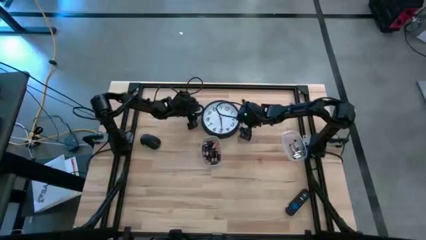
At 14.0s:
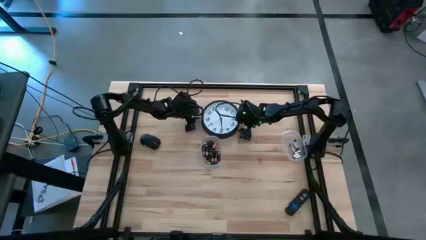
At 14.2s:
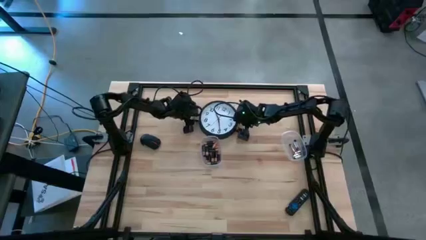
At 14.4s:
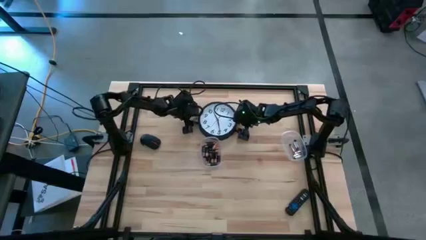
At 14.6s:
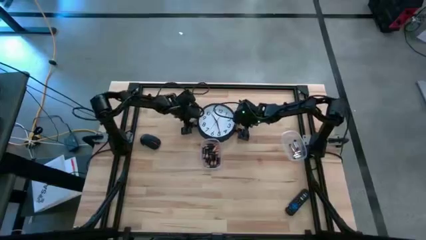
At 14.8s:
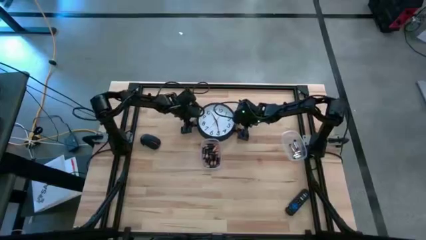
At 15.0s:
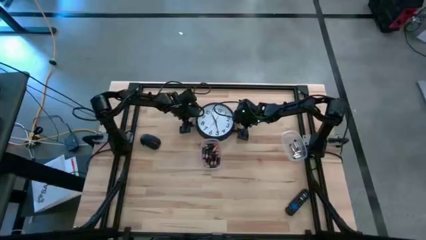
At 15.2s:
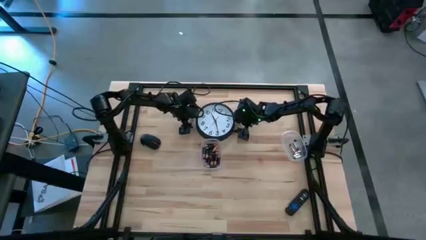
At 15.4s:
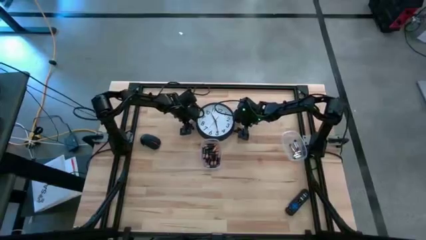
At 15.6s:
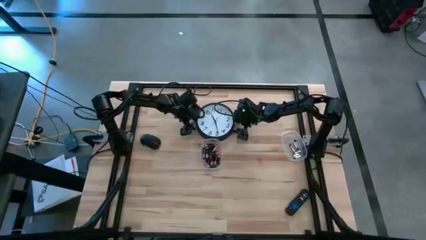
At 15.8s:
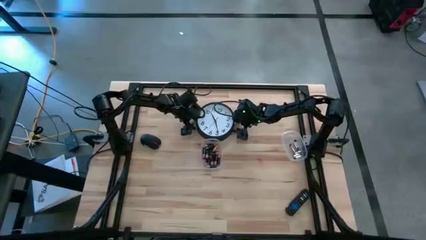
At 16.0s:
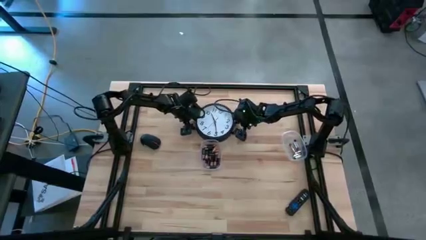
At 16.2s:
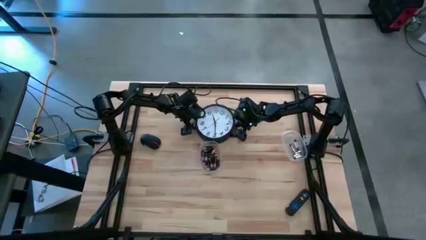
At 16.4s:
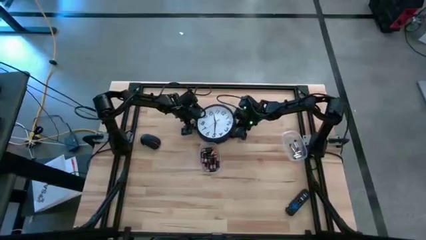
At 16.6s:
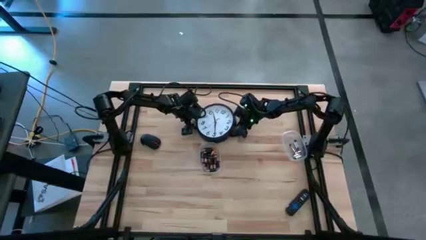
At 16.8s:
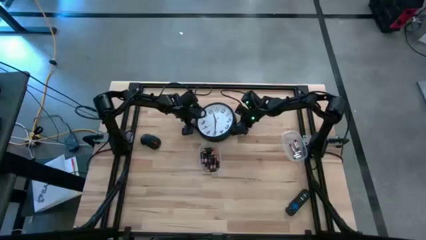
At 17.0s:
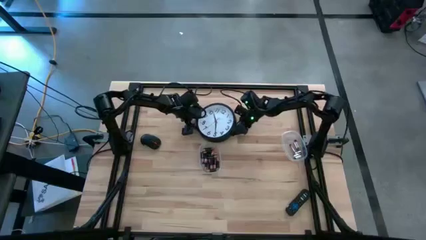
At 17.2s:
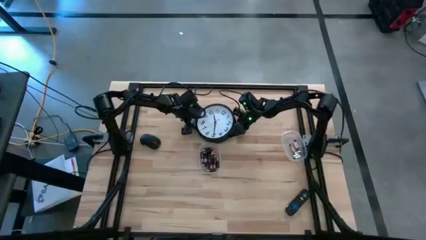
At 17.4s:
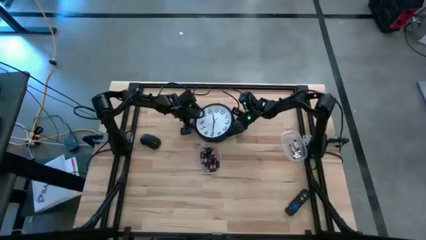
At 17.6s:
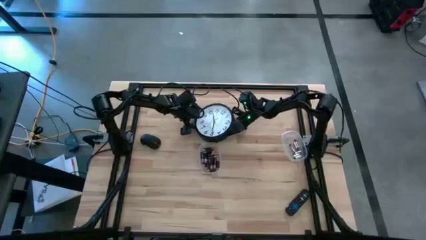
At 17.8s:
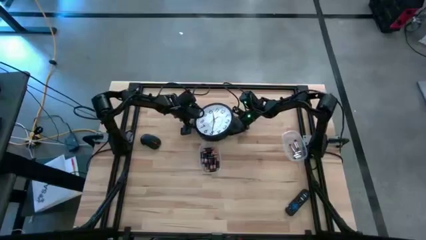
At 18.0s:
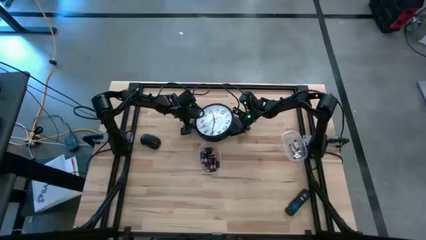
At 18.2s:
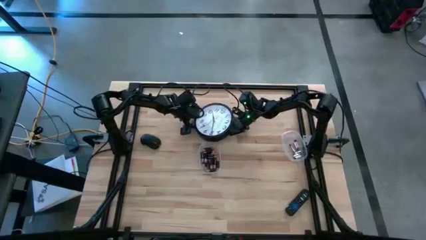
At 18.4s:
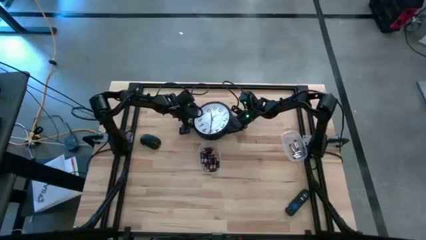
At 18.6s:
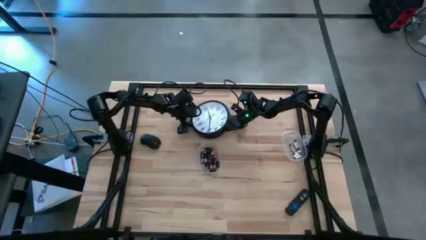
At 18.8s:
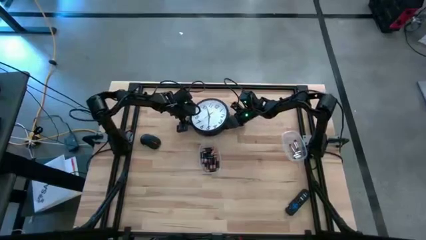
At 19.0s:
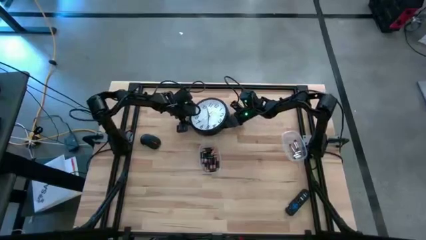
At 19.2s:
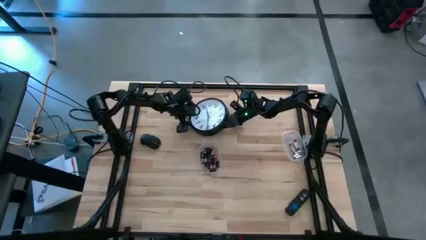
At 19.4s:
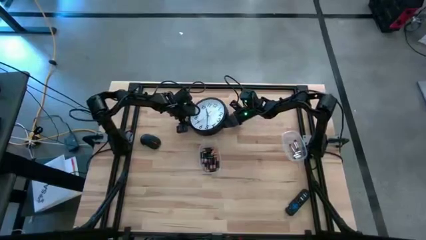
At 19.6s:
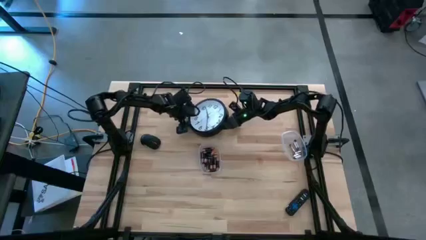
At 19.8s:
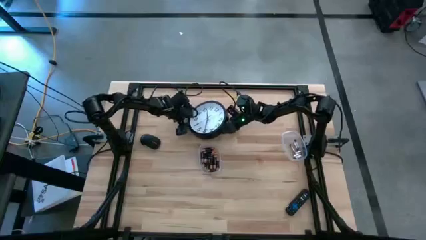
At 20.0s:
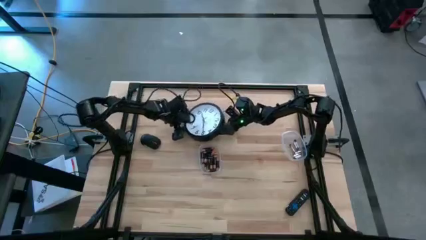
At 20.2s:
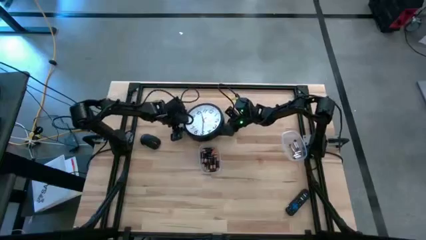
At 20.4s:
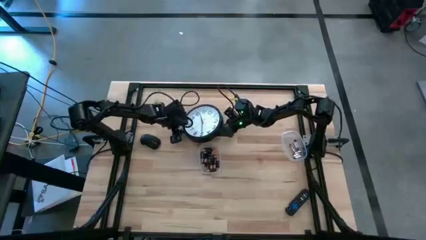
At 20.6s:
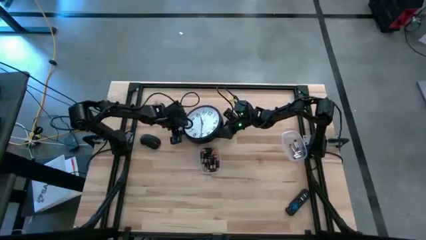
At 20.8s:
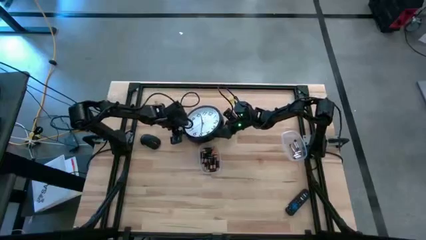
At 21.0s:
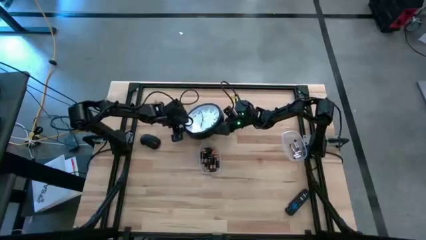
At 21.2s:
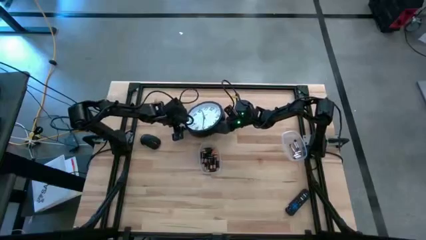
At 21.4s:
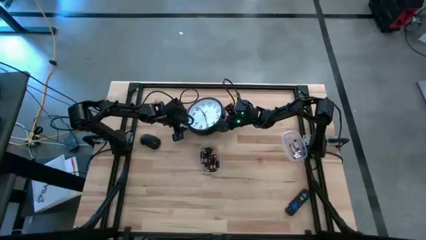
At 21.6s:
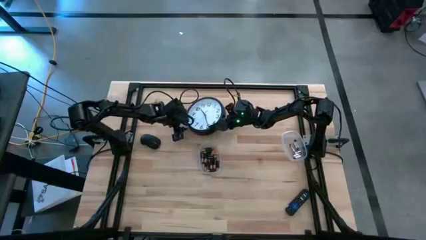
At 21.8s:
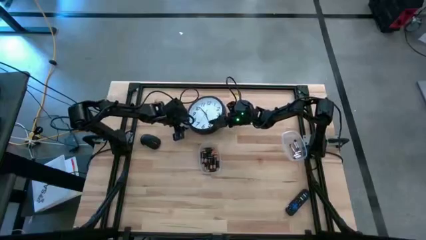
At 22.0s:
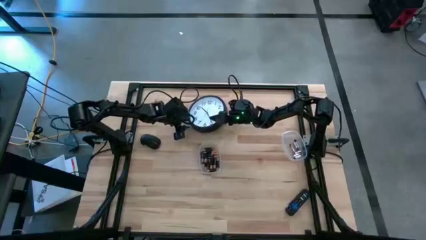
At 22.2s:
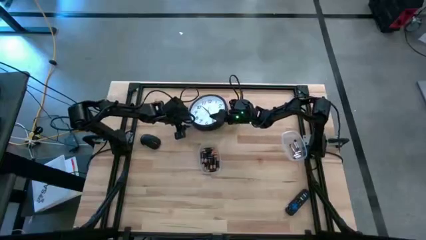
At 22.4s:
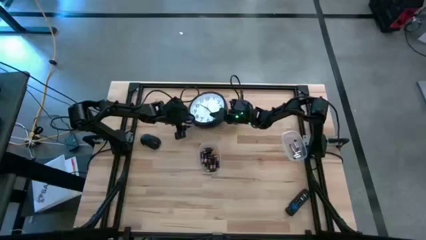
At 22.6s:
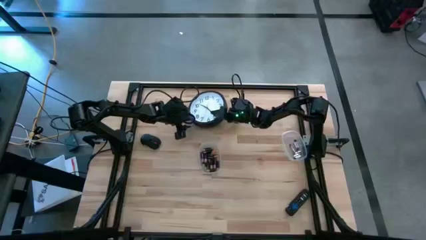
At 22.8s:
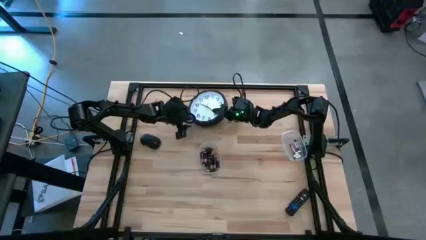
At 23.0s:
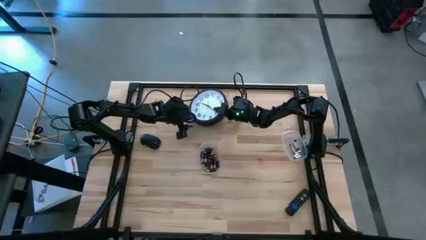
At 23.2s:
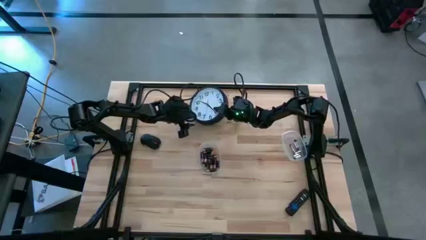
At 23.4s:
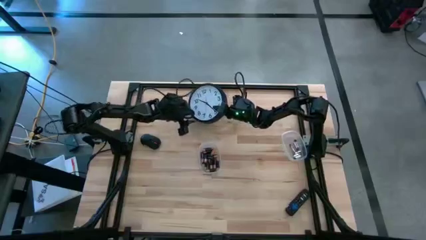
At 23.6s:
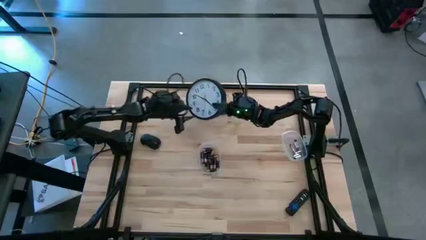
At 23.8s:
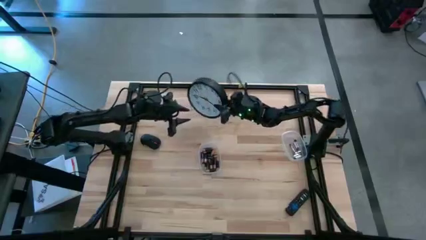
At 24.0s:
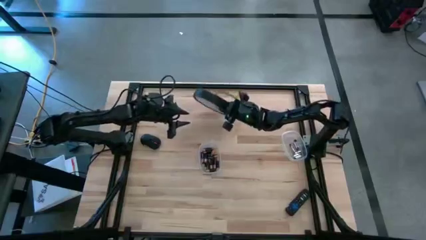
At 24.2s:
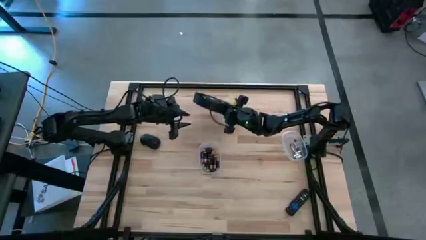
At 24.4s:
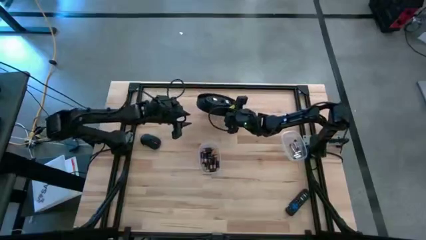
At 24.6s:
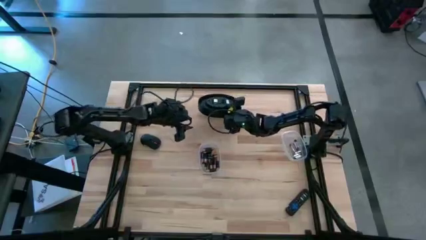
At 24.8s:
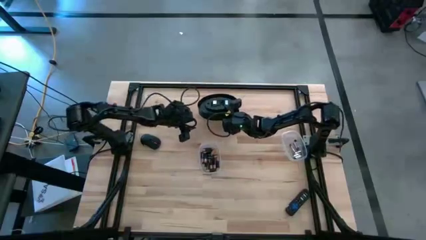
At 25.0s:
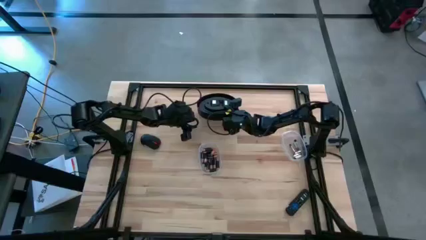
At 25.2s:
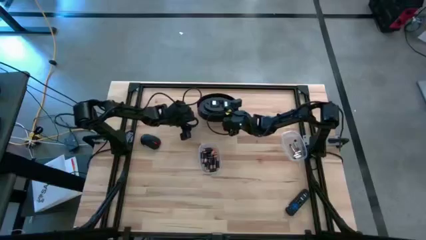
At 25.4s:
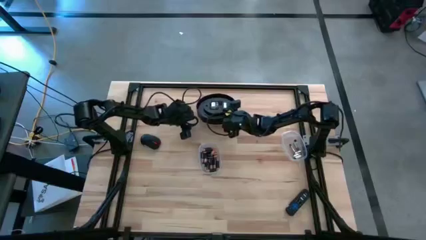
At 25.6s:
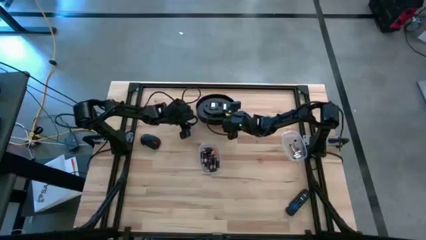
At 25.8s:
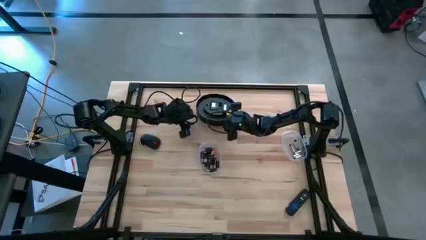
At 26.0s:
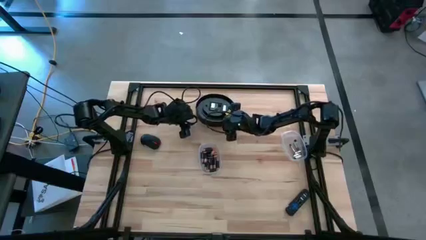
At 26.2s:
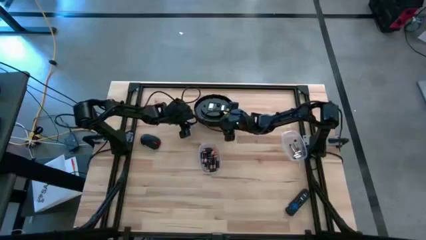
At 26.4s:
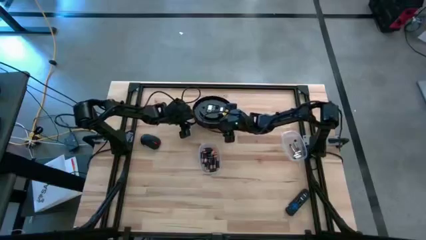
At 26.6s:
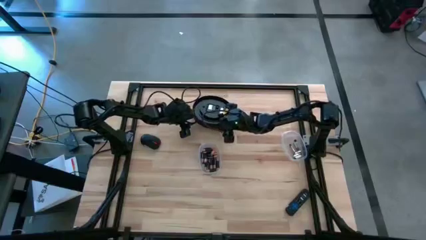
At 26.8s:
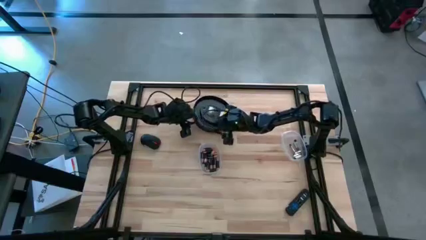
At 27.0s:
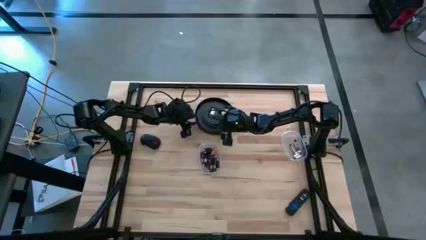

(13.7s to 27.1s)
Task: Insert battery
Move the wall clock to the top of the table

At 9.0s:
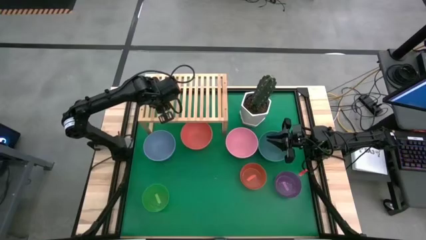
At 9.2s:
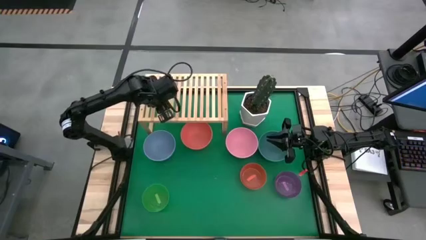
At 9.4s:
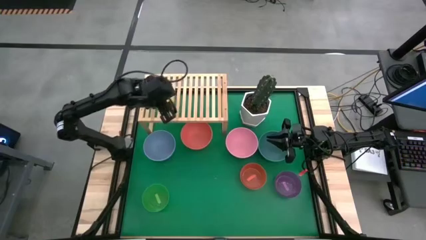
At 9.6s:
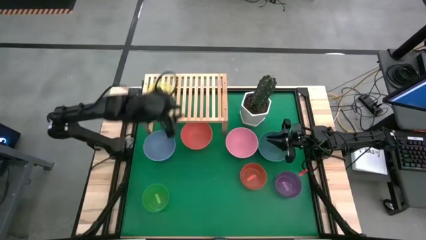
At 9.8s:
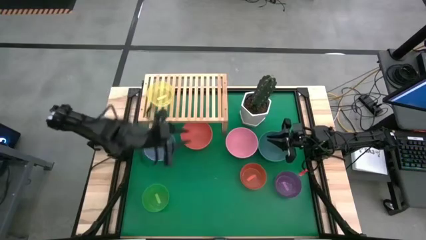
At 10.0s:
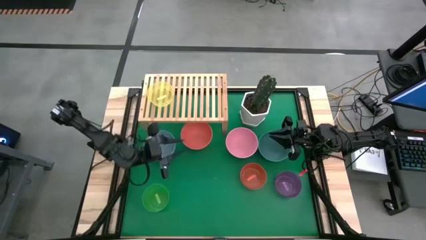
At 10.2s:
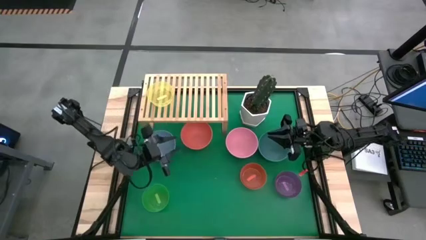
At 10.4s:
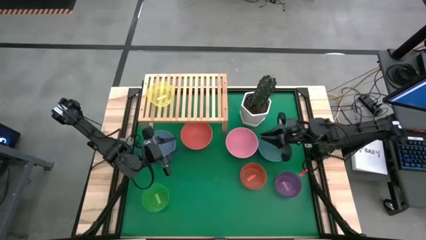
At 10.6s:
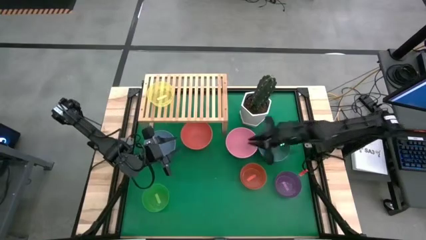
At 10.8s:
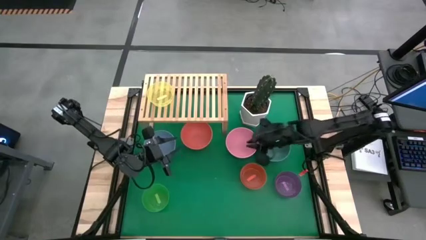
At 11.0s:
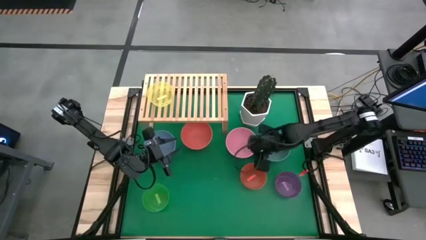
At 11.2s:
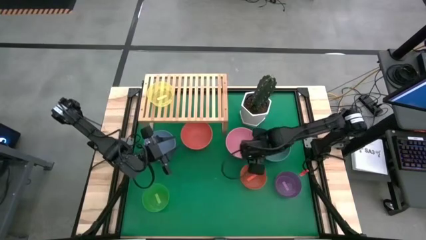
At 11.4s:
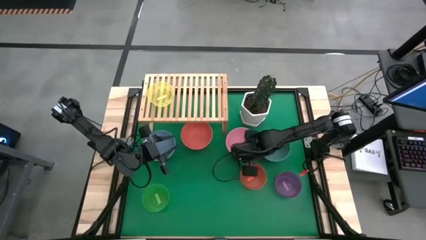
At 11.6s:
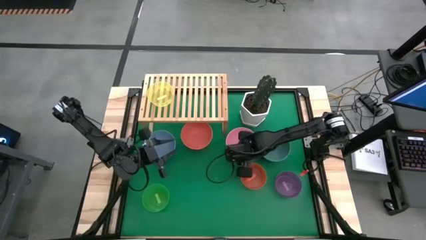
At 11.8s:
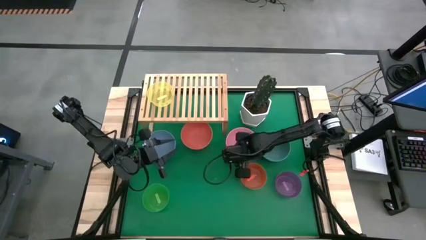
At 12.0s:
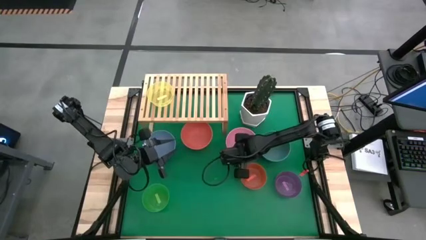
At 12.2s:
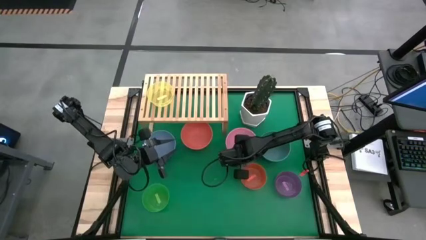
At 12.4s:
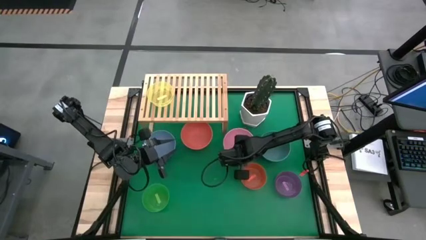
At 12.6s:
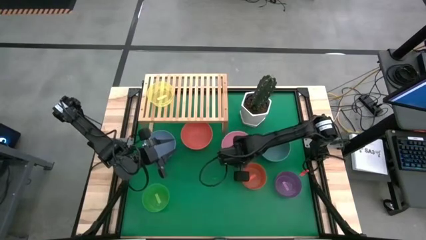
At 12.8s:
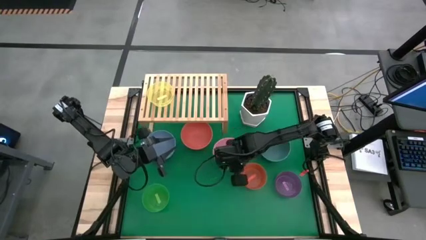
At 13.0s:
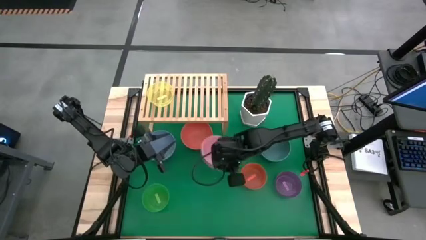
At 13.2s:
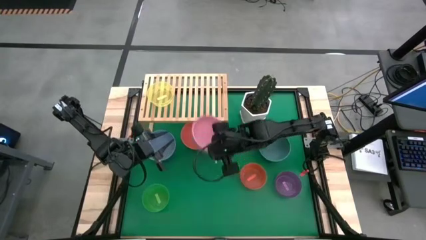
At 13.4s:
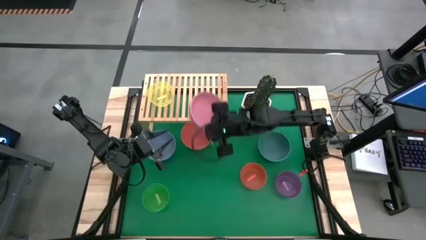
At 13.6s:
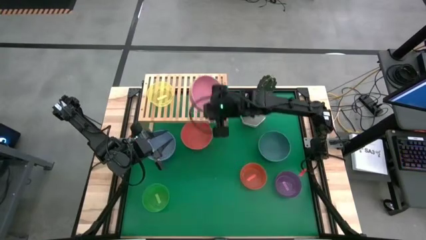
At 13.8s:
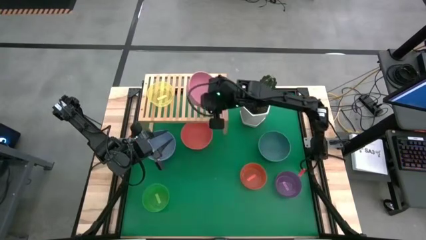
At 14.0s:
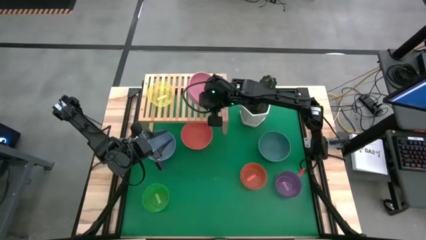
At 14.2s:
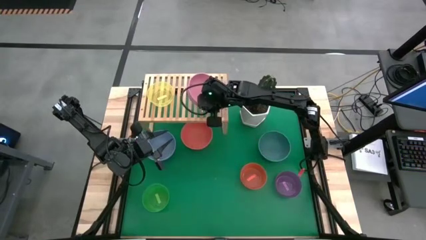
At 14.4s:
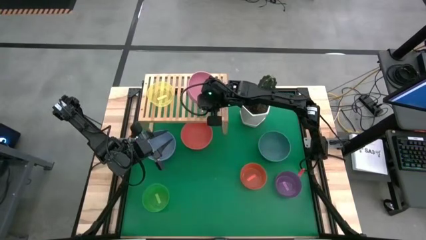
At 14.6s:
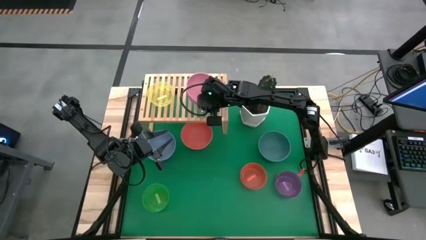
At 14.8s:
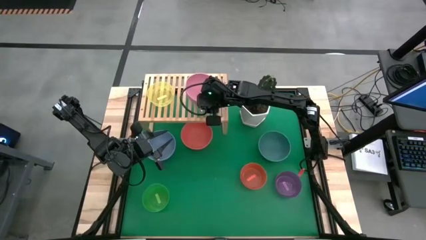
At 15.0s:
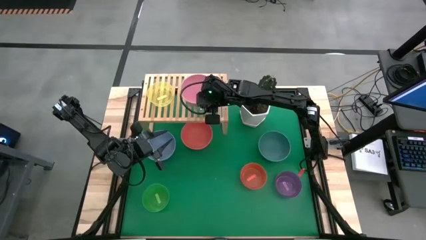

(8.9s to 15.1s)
Task: Place and stack bowls onto a shelf
Put the pink bowl on the shelf
